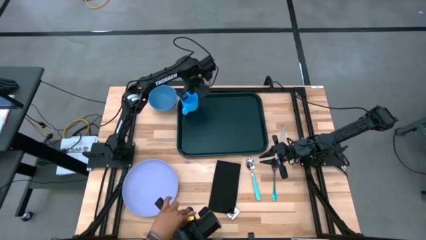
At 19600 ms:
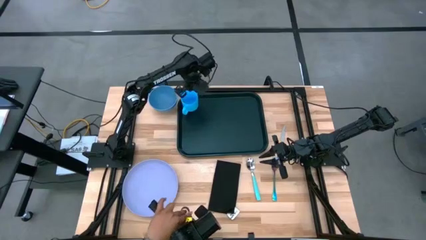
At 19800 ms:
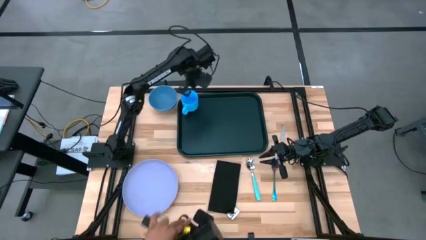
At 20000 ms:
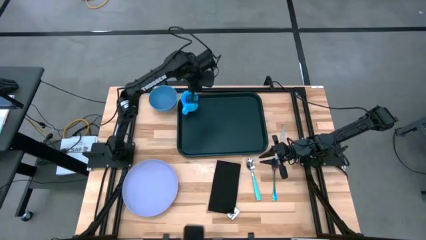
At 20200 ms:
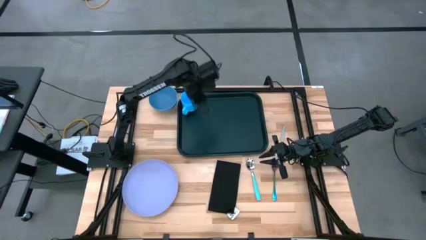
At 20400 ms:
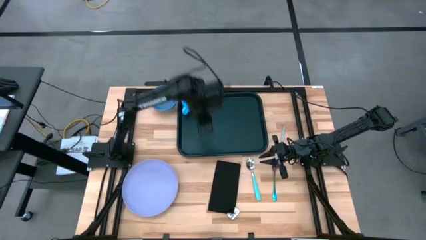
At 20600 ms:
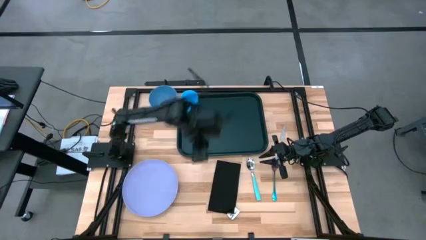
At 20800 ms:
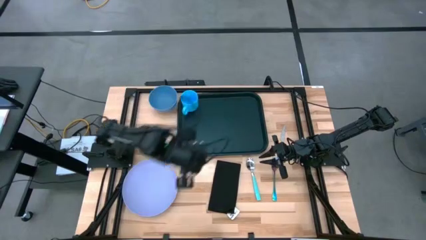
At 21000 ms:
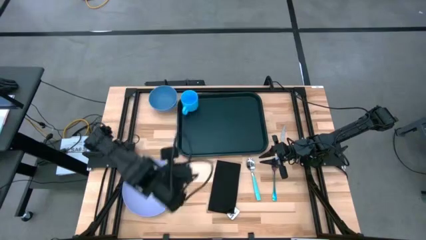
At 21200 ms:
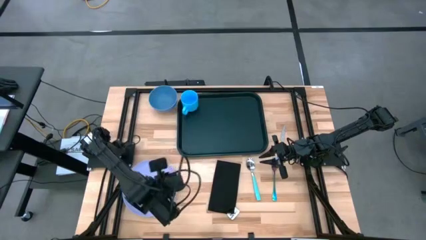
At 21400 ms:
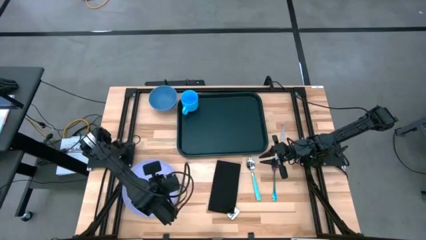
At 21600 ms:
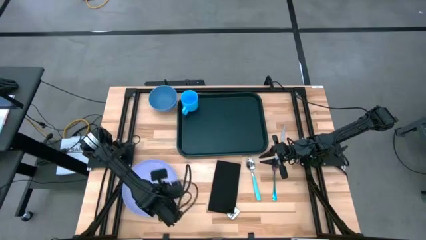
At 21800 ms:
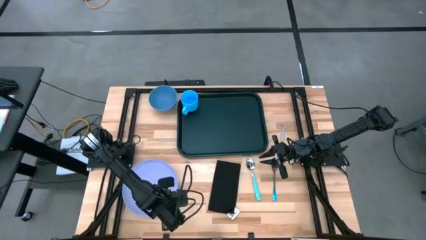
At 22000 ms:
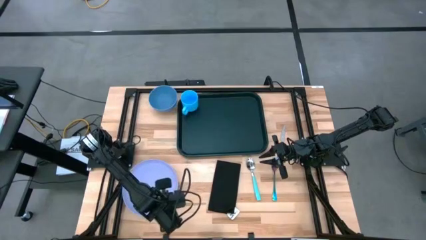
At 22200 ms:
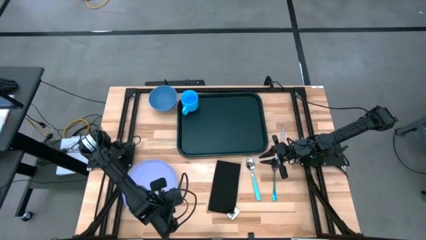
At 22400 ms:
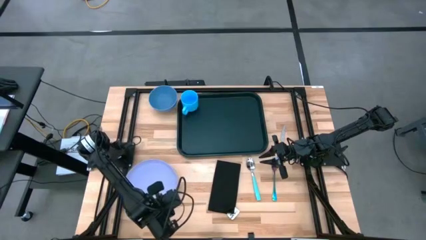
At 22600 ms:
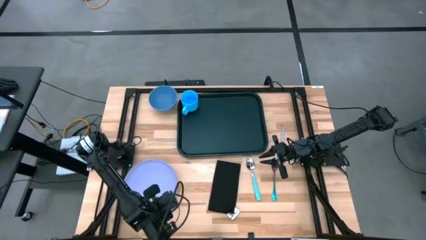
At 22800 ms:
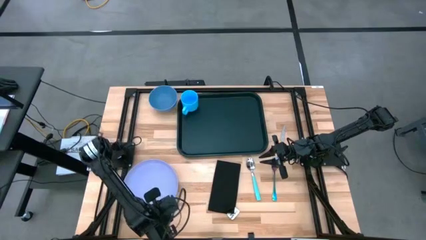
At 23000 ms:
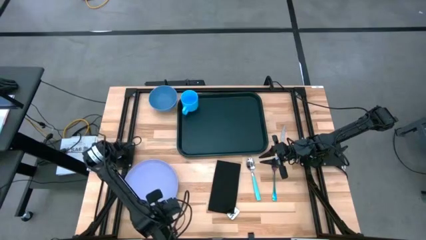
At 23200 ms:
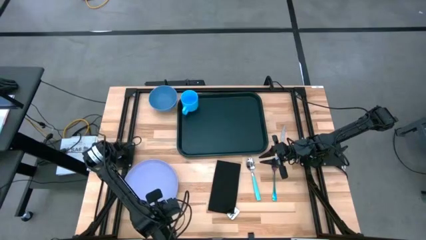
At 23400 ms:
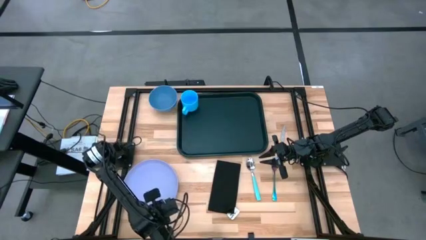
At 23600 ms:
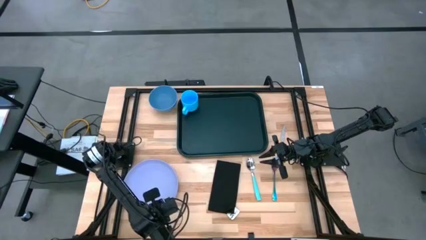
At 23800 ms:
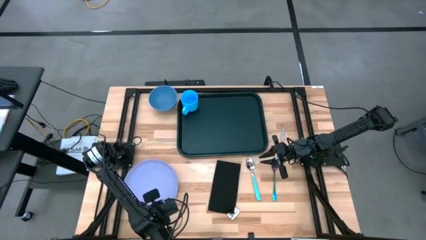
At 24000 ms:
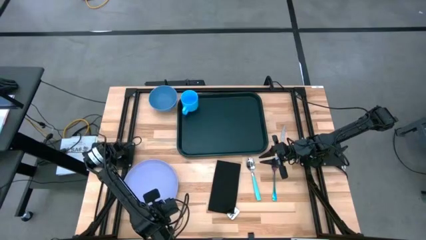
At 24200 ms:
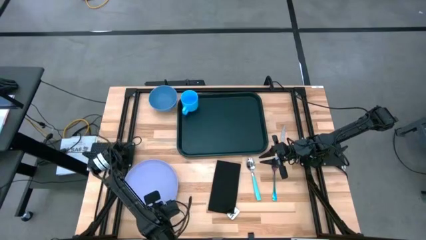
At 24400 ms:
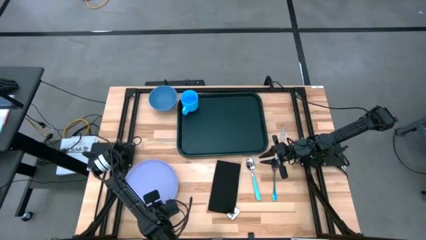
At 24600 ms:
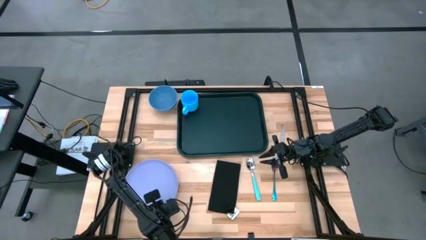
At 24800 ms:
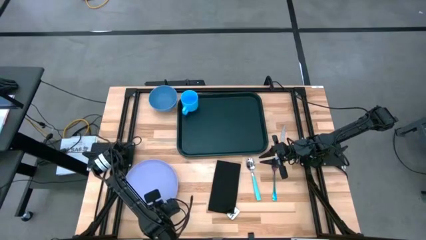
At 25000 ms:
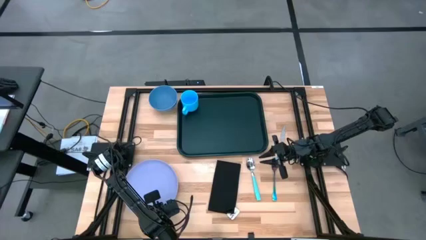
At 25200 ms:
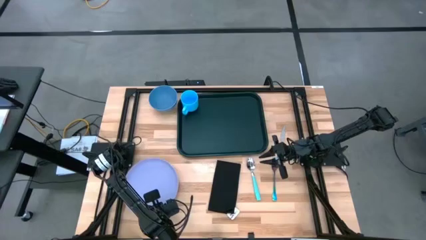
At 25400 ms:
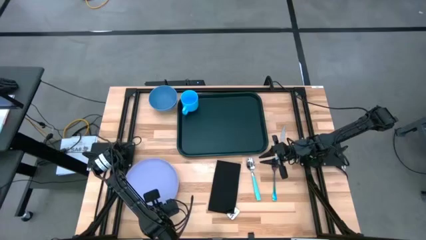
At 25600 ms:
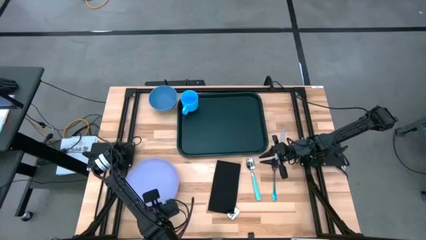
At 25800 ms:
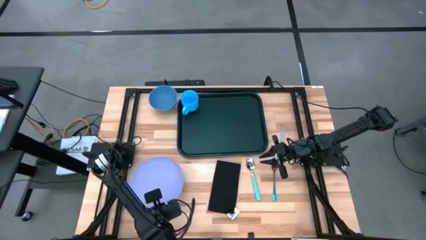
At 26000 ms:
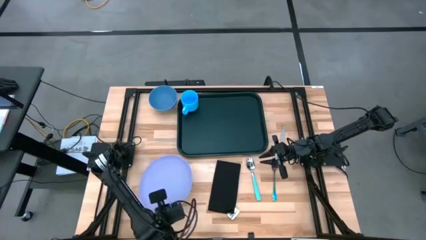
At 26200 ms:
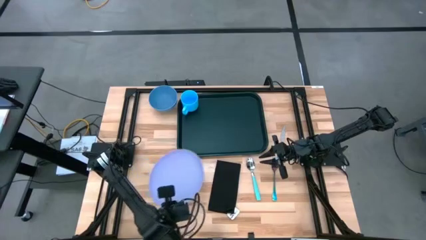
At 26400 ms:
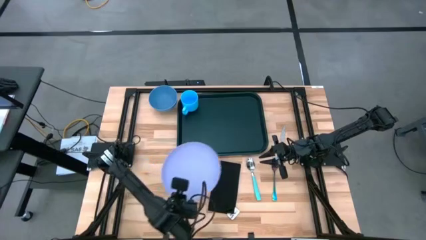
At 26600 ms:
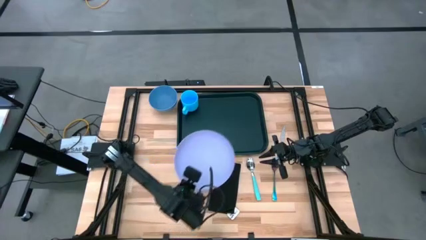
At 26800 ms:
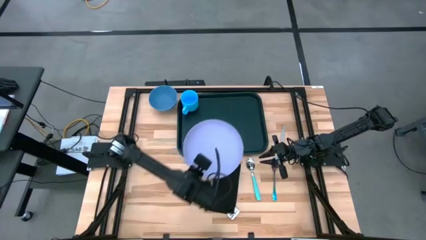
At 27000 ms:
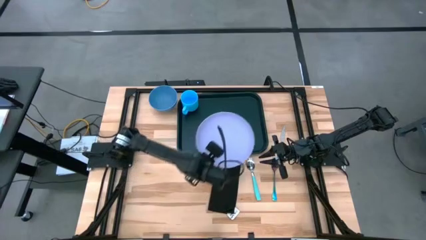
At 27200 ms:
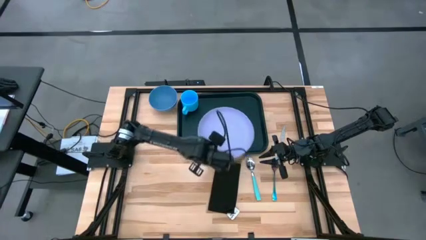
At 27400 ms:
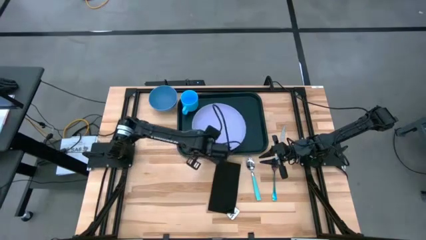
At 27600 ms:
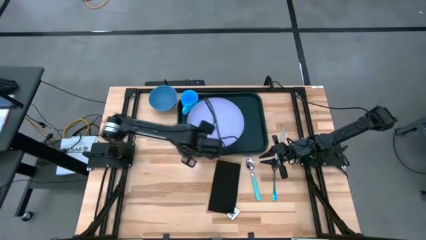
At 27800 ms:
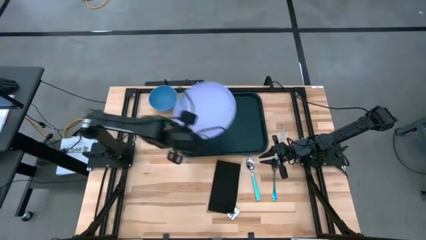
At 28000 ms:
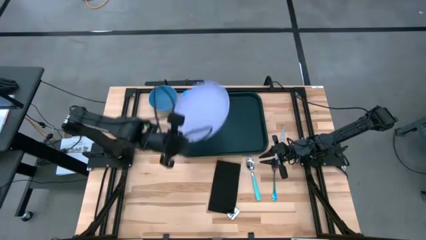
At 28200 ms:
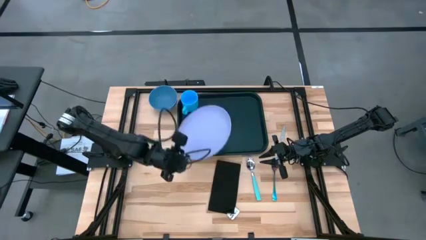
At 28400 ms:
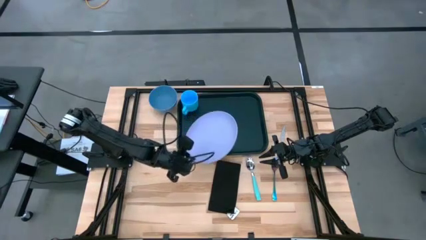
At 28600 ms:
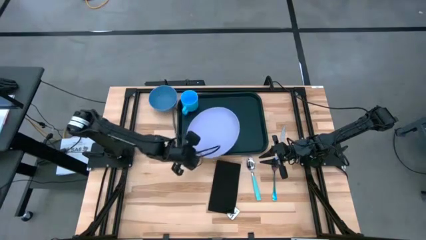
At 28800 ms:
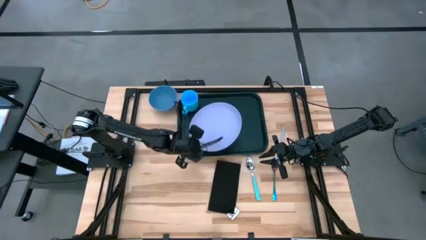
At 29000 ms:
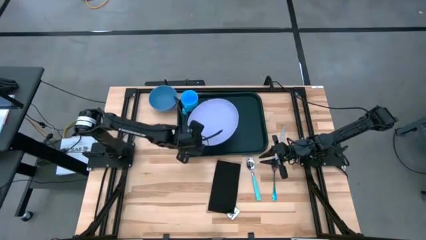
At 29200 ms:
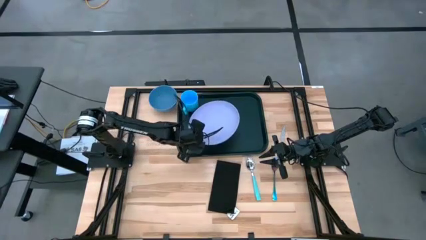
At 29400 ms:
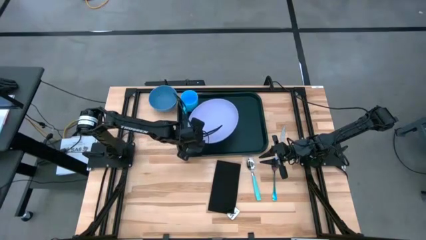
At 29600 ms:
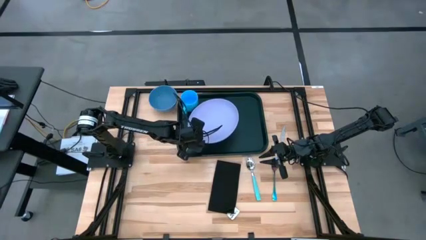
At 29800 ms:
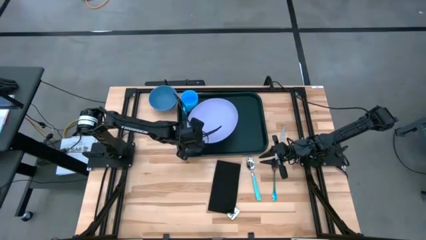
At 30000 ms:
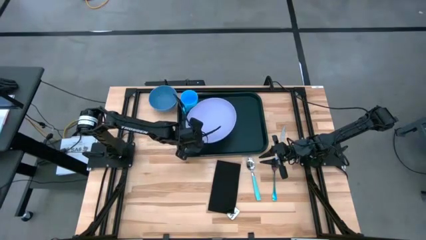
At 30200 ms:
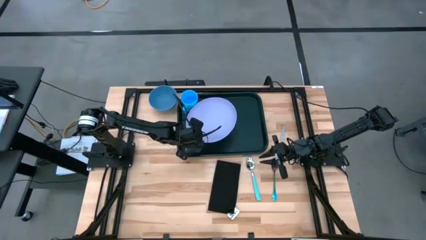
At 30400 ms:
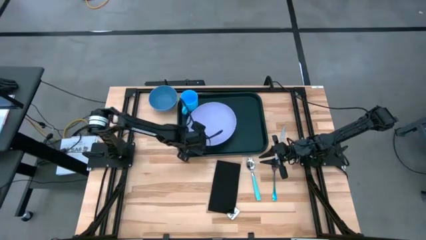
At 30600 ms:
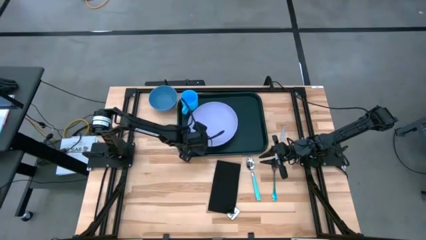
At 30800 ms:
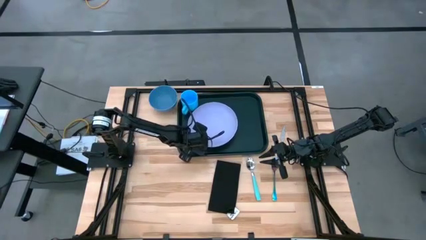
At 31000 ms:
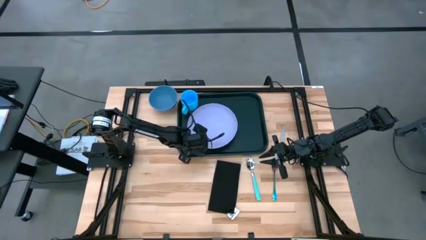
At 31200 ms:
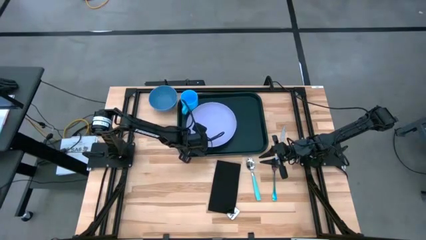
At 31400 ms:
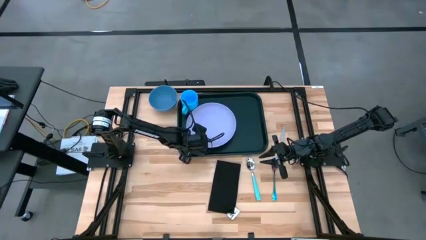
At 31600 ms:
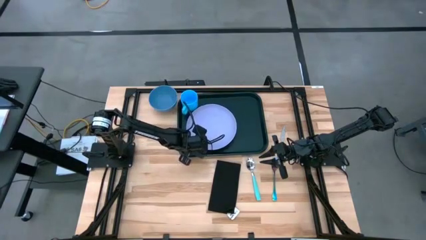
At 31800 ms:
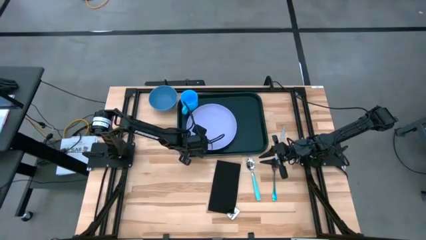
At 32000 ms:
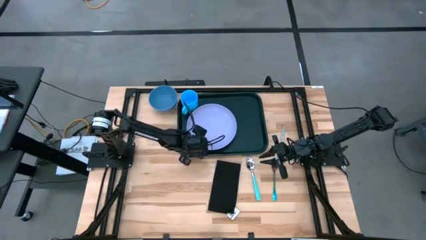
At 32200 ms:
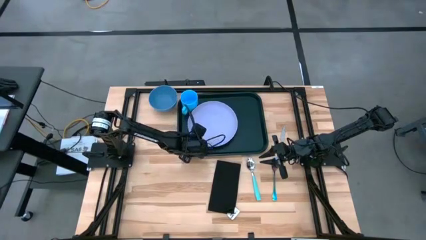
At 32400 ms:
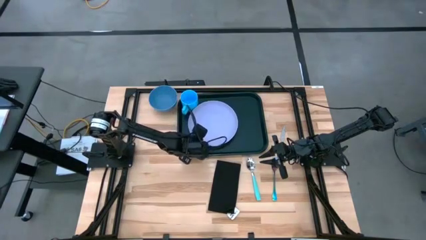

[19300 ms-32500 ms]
Task: Set up tray
Put the purple plate in the center of the black serving tray

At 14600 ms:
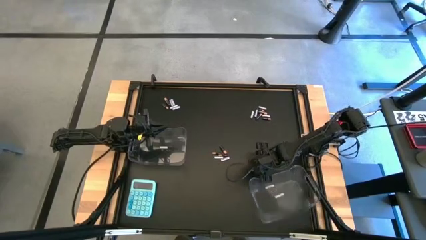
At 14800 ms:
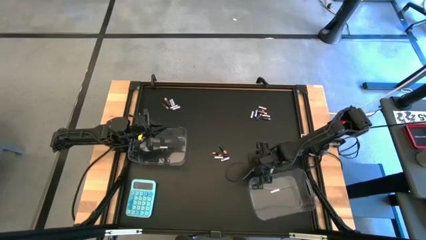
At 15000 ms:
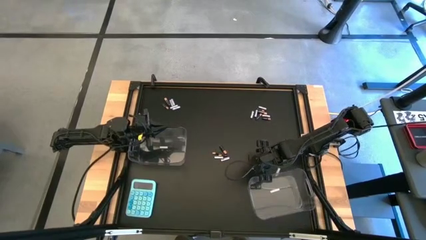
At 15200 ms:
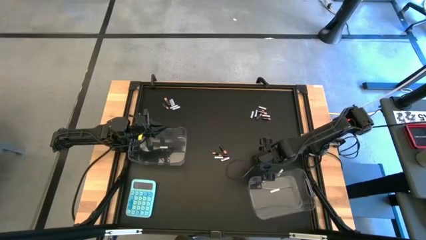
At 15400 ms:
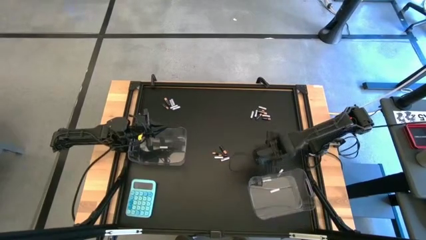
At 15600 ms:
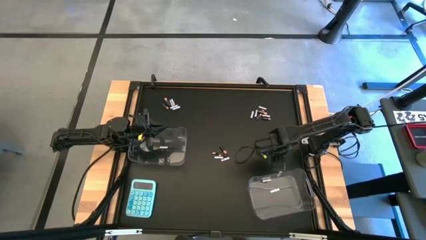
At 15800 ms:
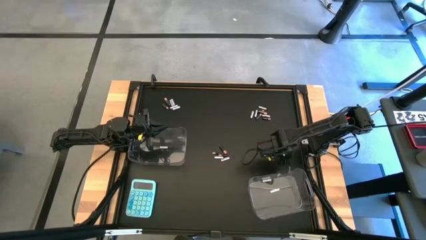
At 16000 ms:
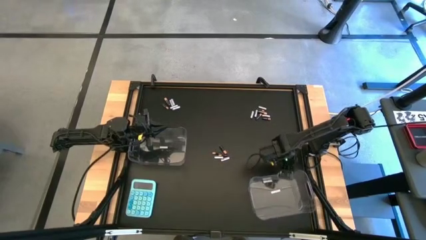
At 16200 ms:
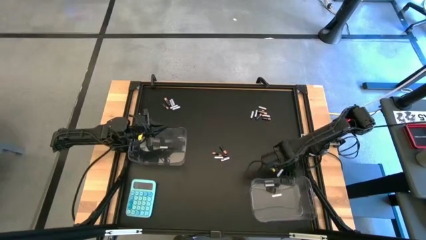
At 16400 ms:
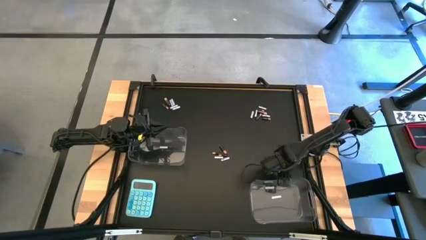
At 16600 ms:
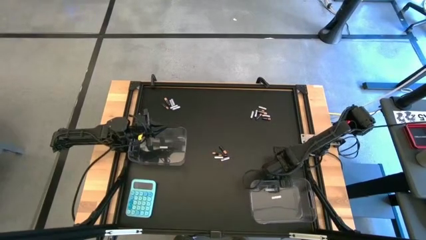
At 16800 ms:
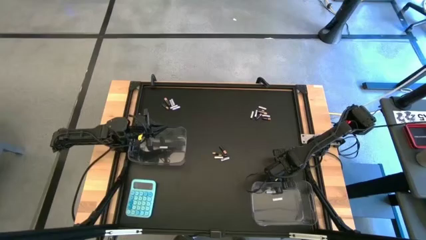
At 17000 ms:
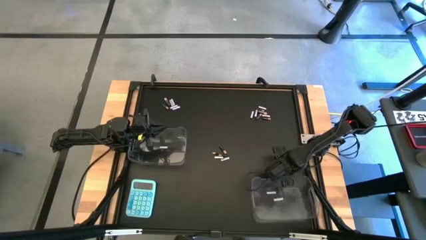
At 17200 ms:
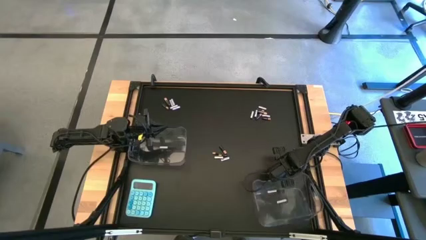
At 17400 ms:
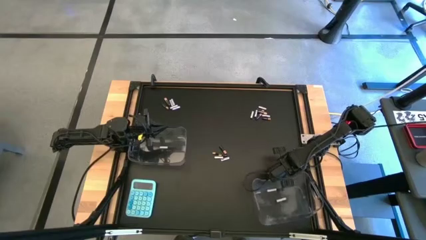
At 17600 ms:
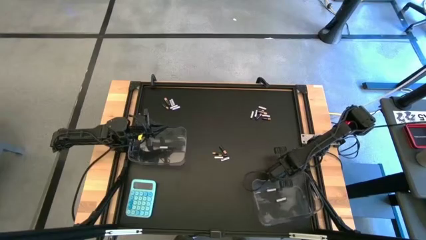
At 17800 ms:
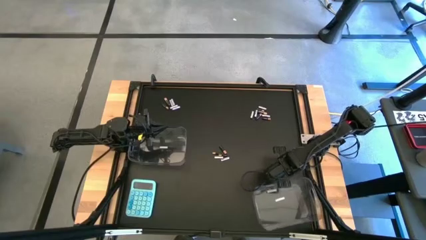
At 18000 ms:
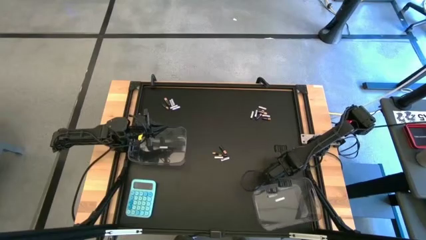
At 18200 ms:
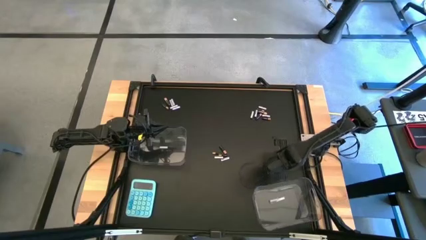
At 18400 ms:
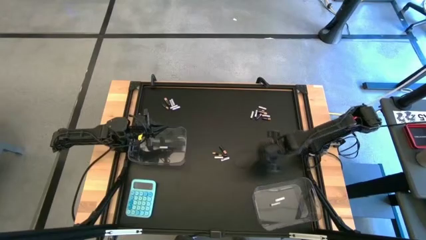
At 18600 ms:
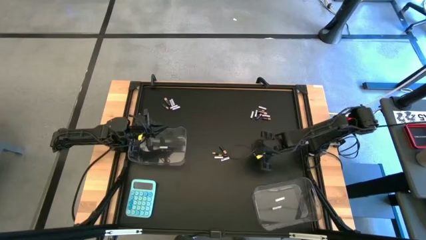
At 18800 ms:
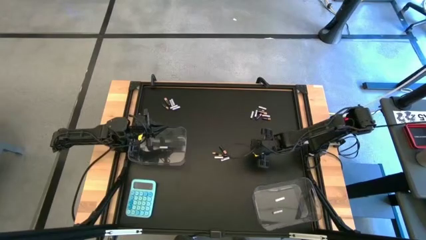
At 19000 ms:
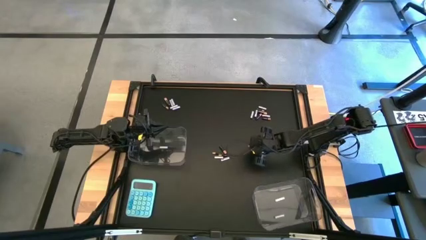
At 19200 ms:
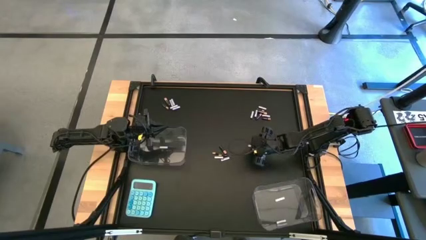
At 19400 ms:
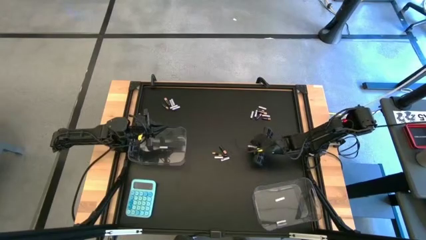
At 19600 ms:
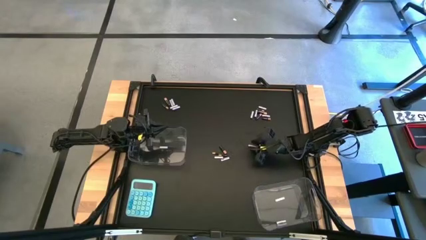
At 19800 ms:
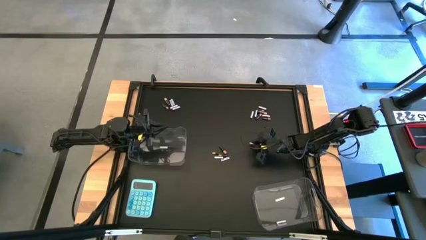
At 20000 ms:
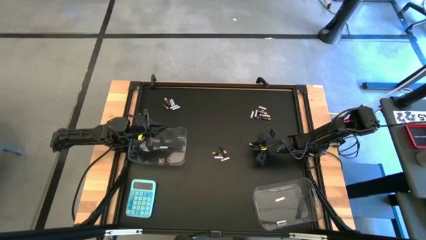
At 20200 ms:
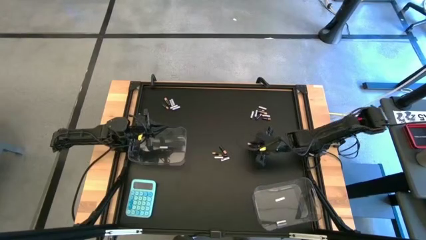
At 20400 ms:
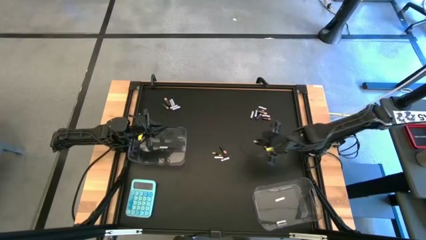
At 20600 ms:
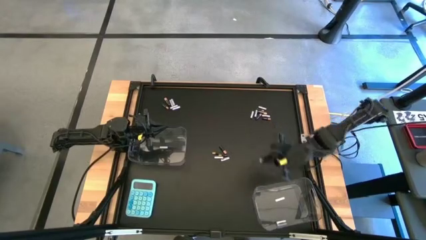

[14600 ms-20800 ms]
Task: Sort batteries
Put the white battery into the right transparent bin
